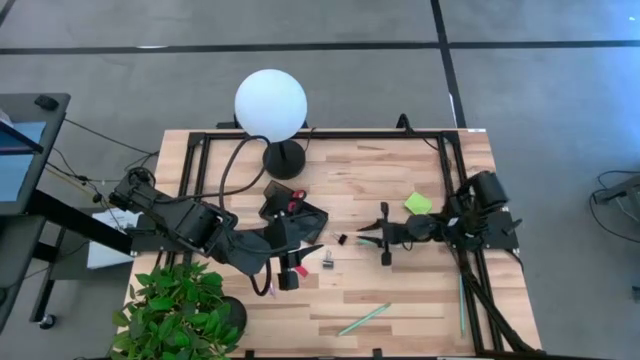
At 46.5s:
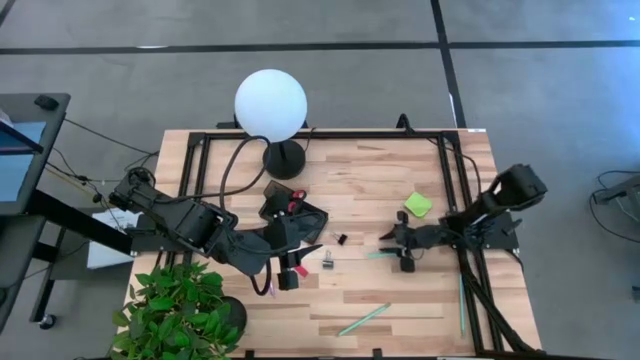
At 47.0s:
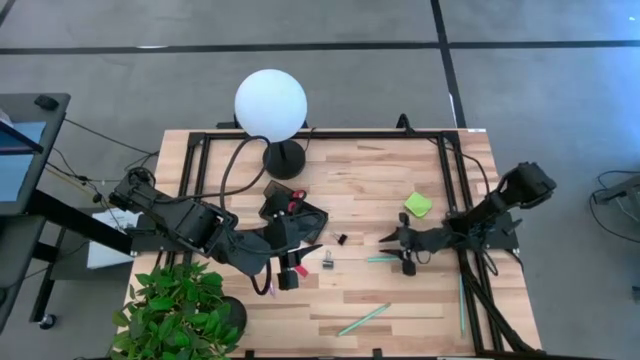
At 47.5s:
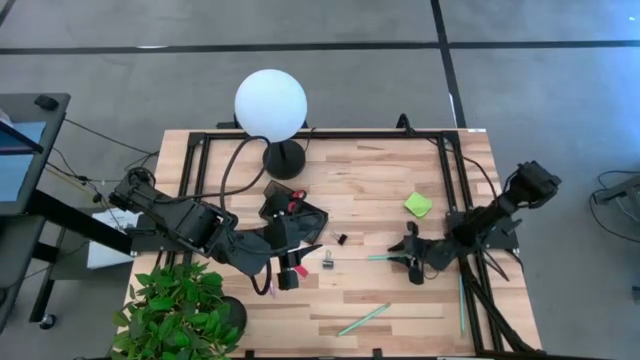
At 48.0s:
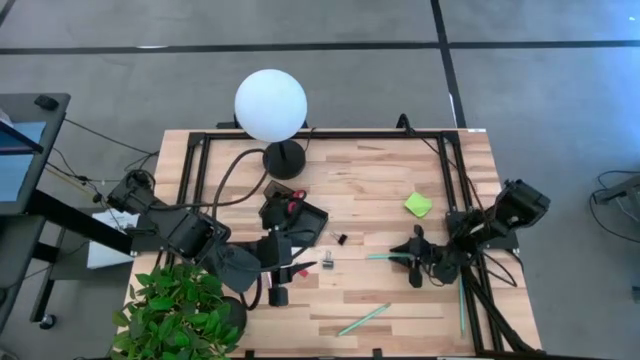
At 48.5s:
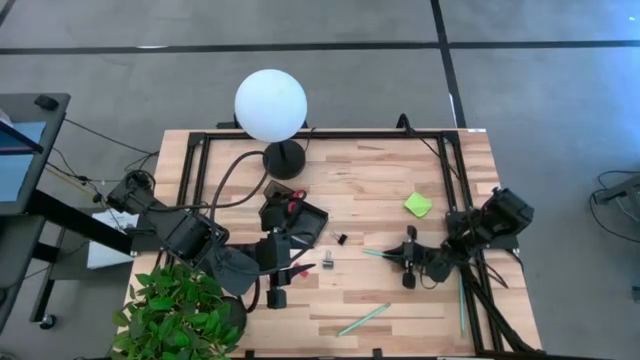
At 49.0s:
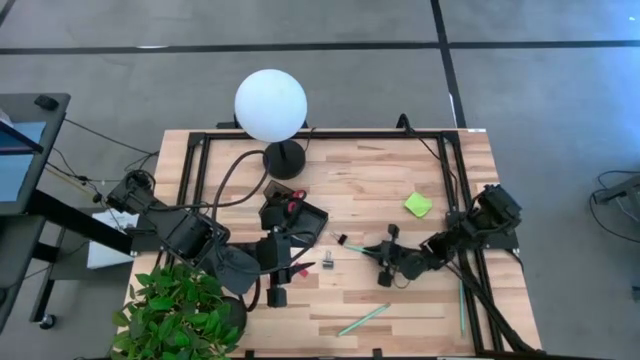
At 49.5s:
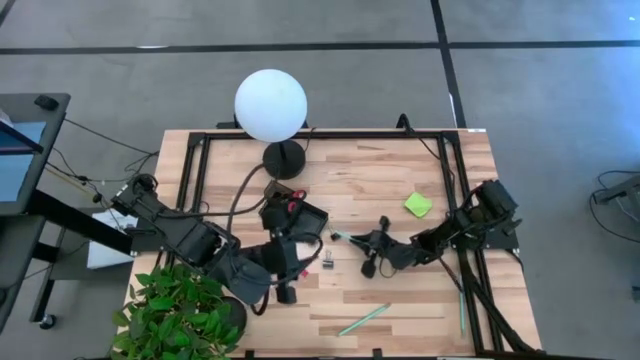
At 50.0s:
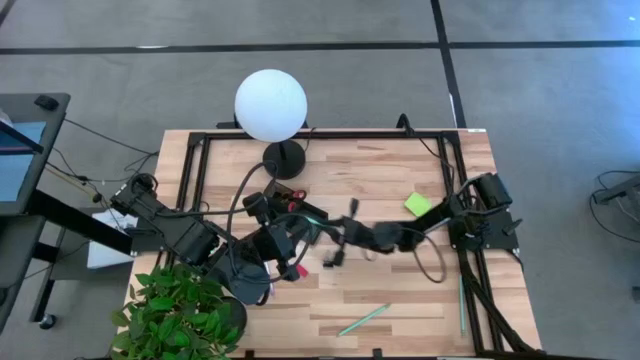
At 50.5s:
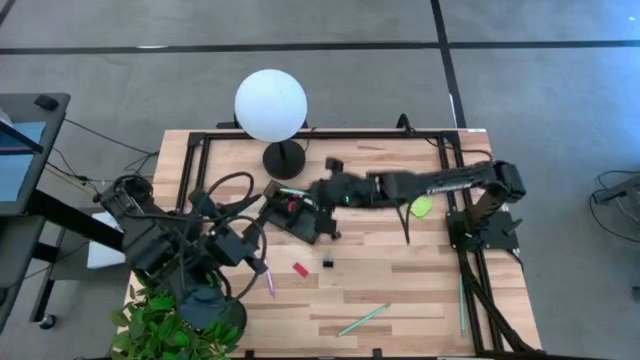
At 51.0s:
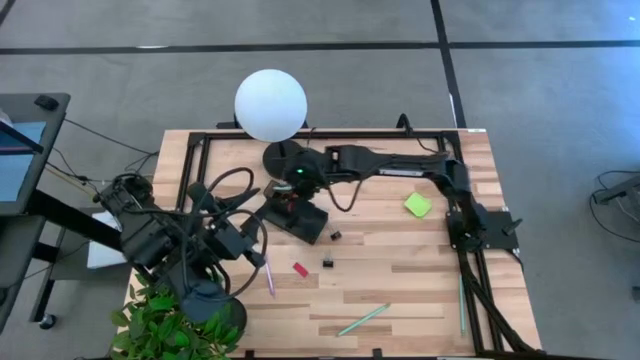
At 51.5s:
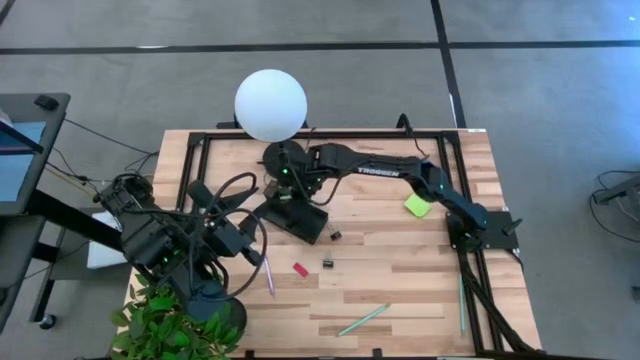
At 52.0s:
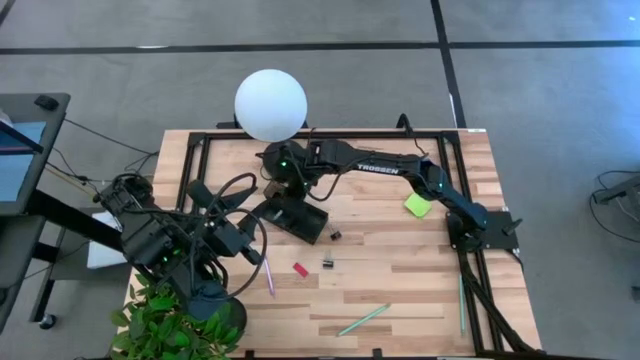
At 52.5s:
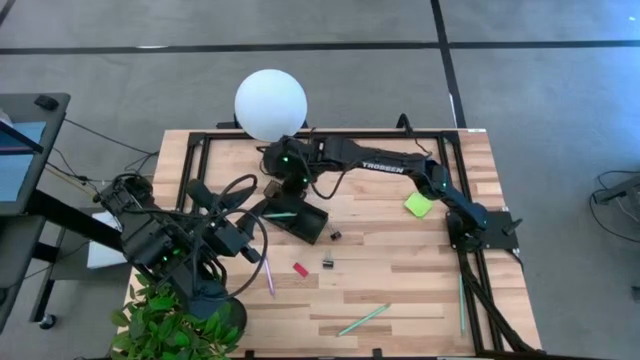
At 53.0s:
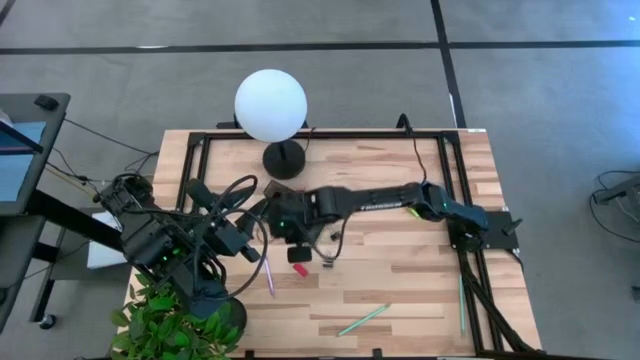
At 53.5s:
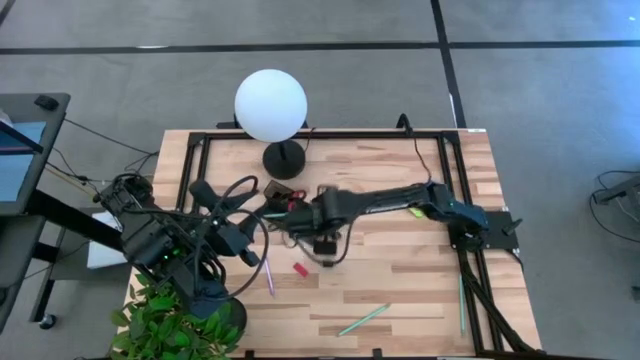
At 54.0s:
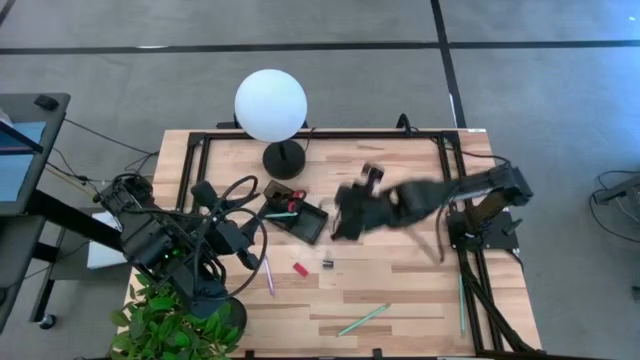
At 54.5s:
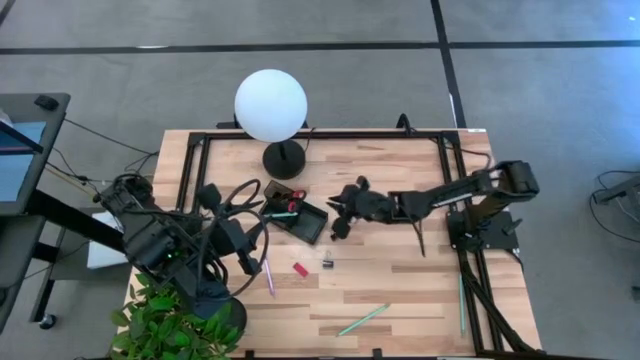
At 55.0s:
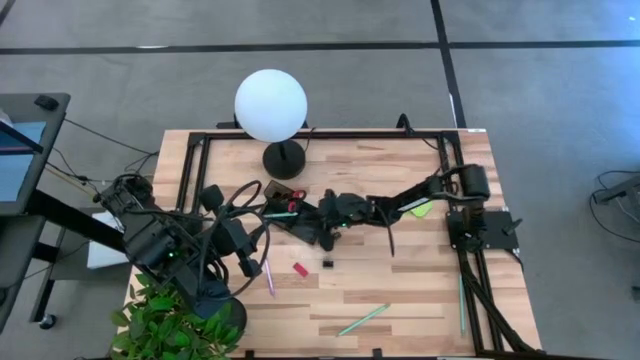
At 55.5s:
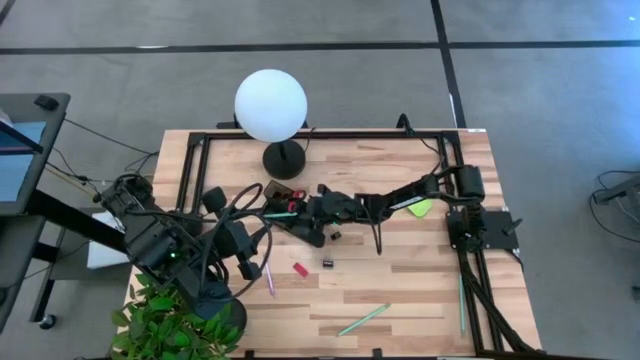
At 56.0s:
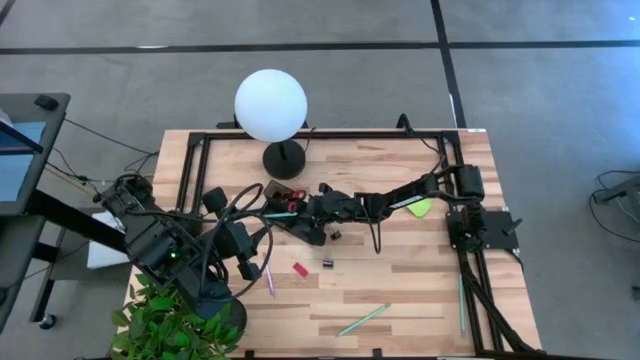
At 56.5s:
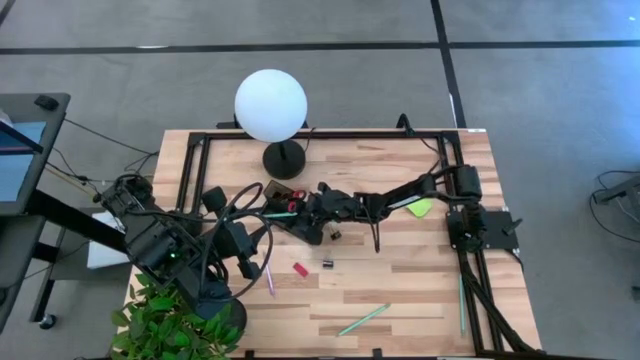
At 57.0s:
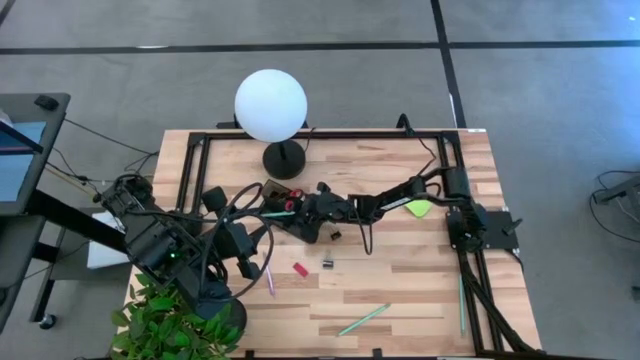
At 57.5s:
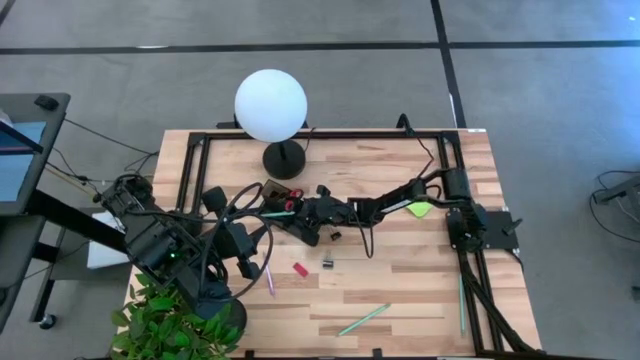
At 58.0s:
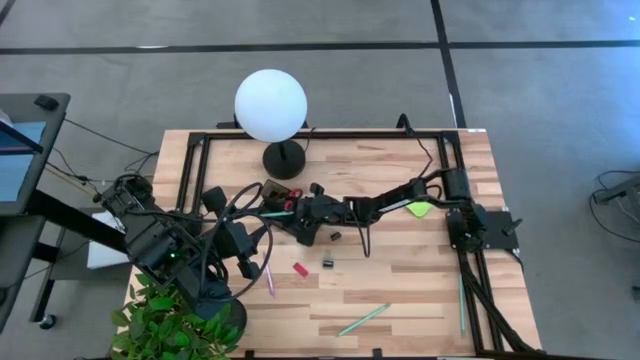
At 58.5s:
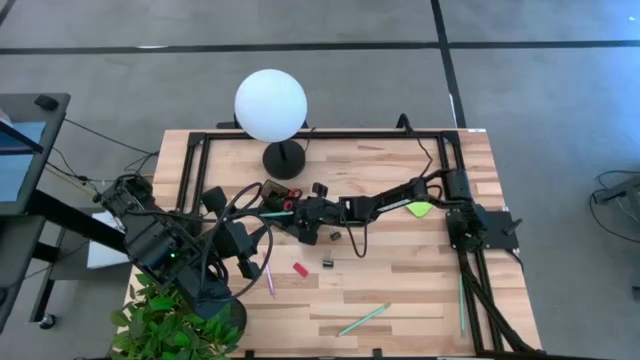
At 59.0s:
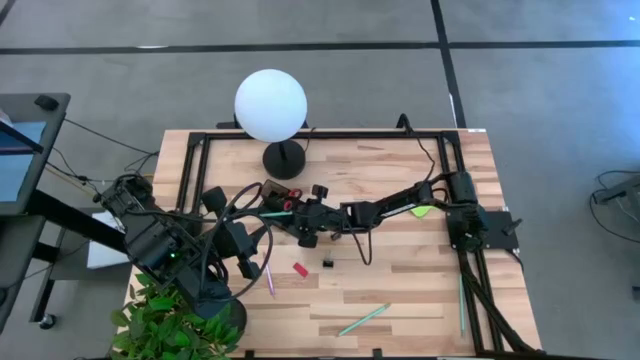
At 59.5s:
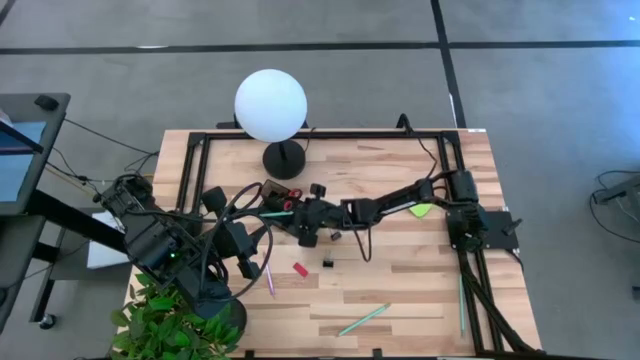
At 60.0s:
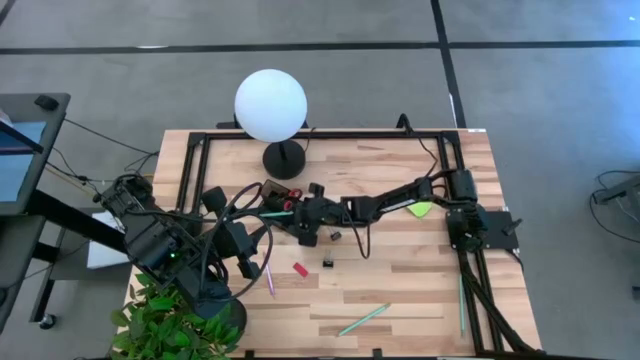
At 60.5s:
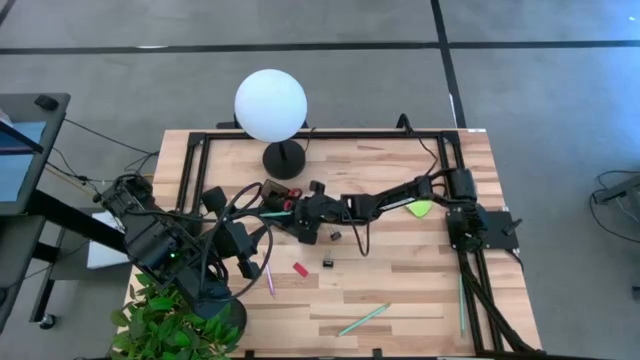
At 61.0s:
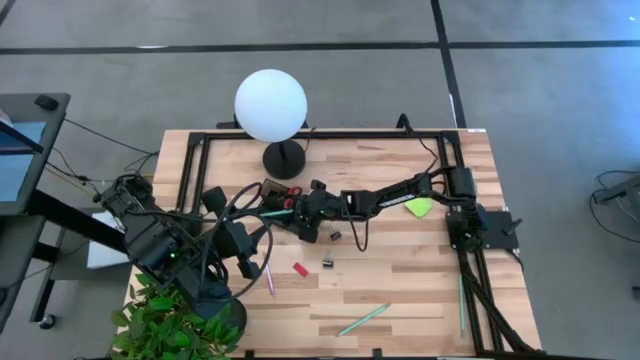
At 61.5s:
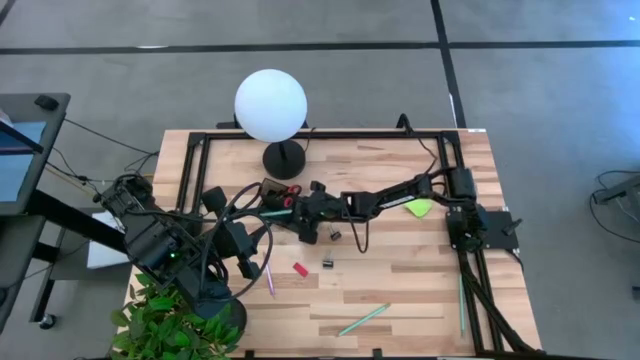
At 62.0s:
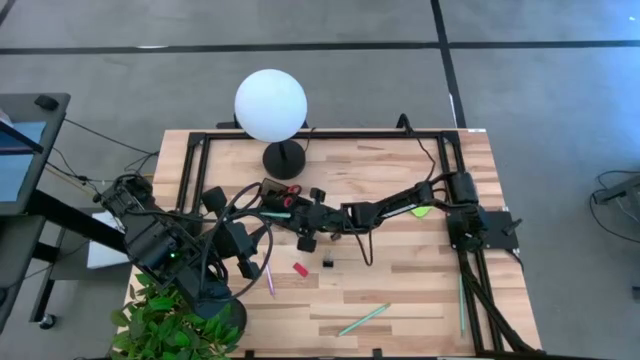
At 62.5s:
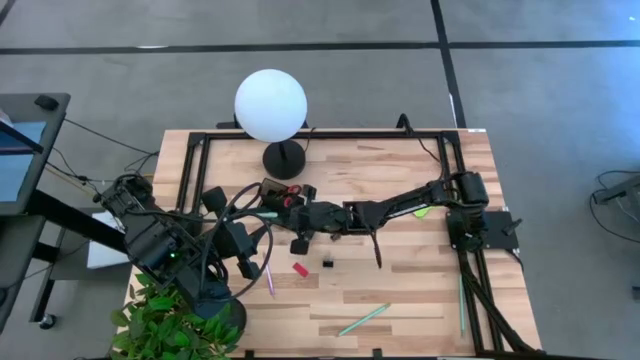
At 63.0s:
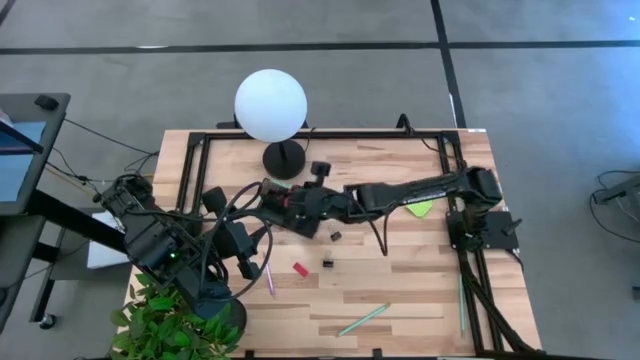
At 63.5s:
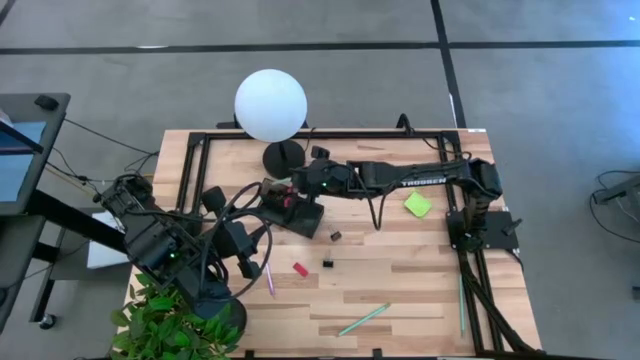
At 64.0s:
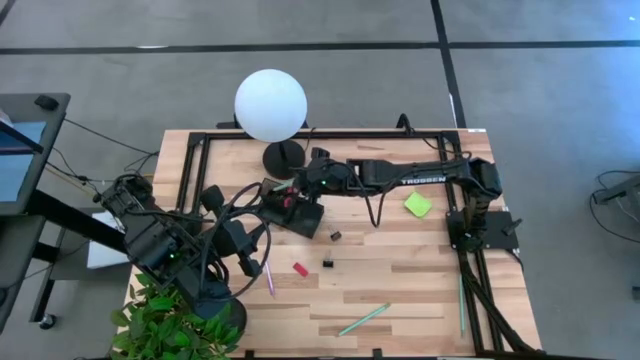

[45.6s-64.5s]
Task: Pick and place office supplies into organizer
Put the blue pen into the black desk organizer

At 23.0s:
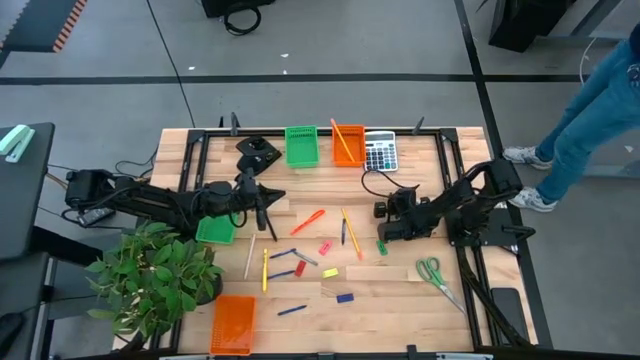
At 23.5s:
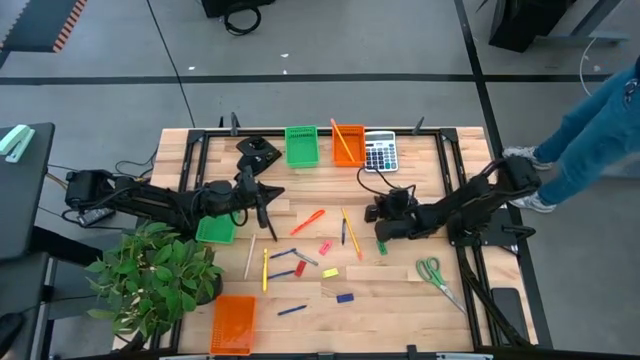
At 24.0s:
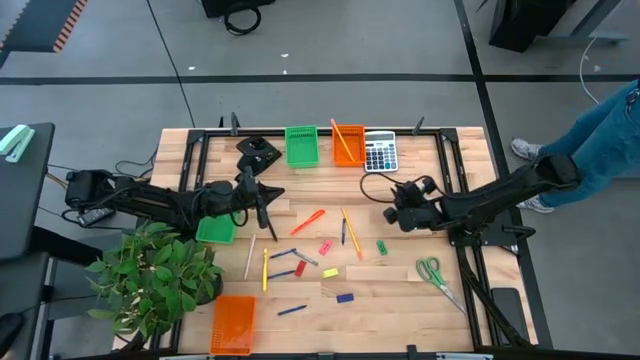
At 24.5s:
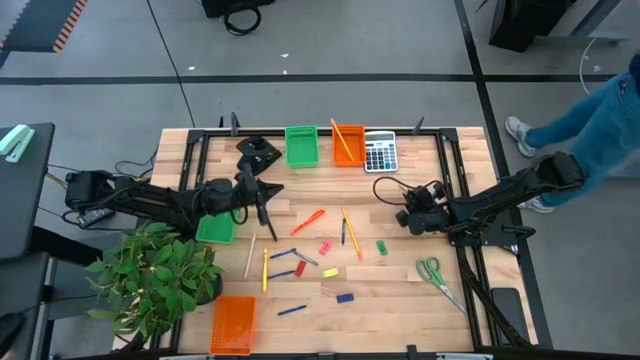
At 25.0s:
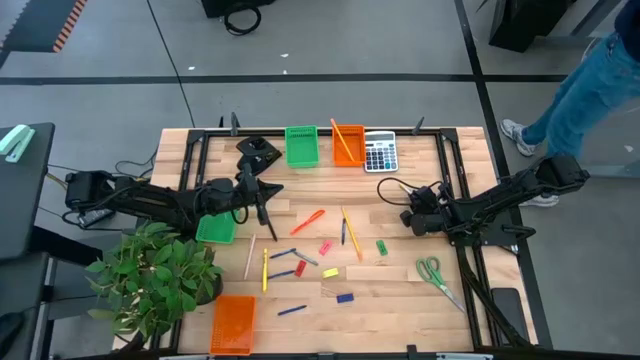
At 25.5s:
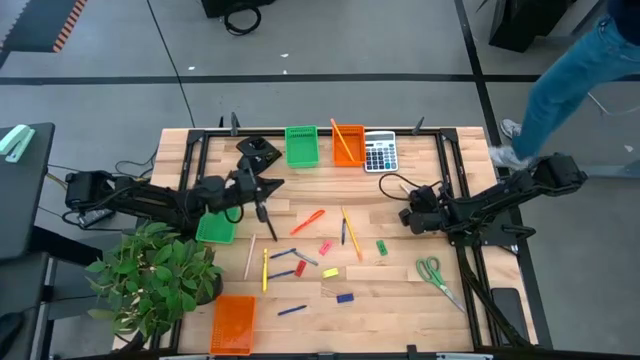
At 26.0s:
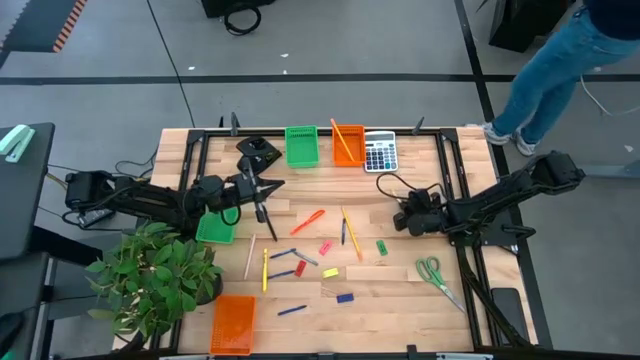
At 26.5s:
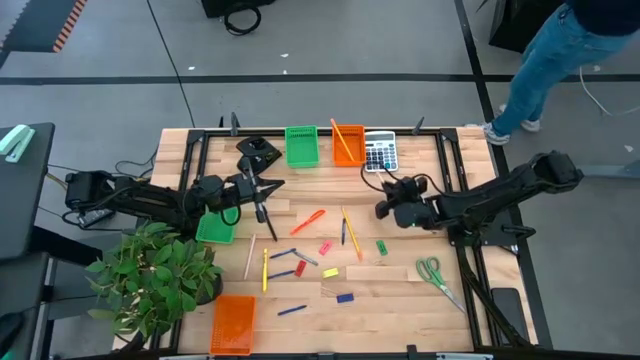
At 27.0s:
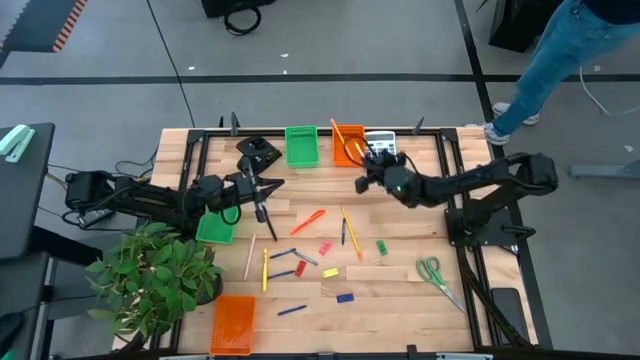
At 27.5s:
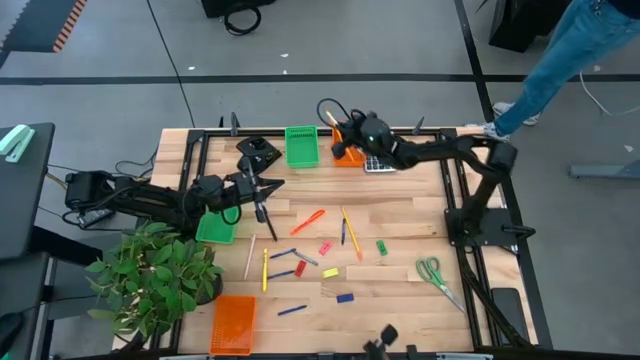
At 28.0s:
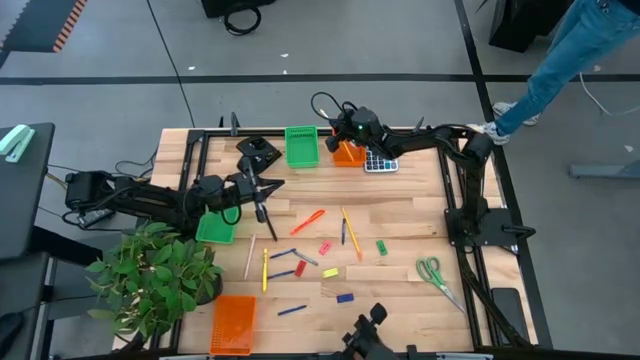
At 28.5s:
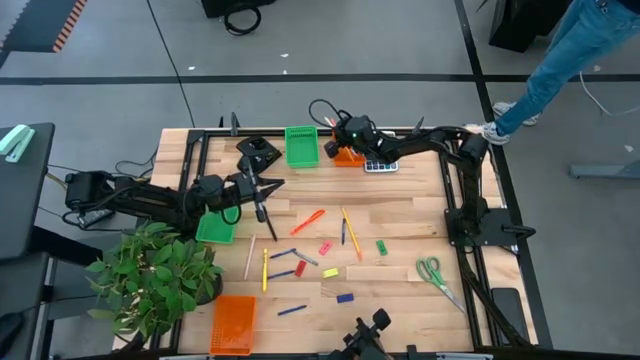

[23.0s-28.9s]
Task: Sort crayons/erasers/pens/pencils in bins
Put the white pencil into the top orange bin
